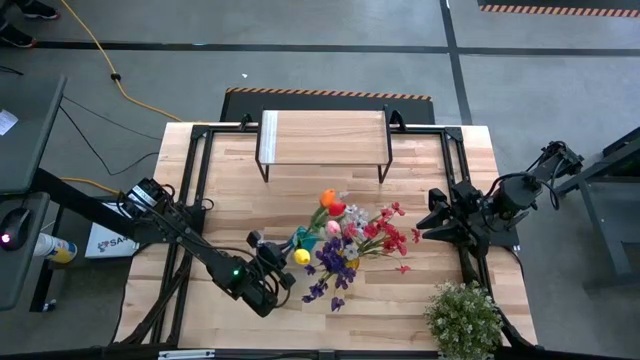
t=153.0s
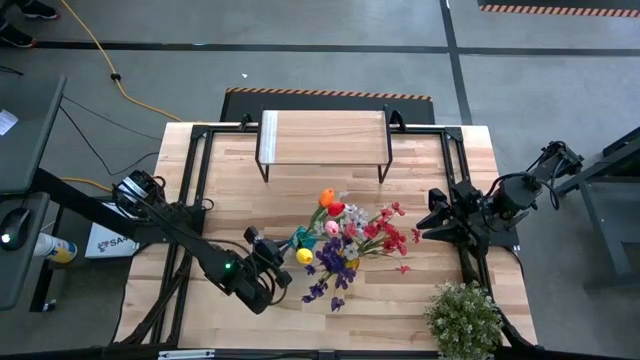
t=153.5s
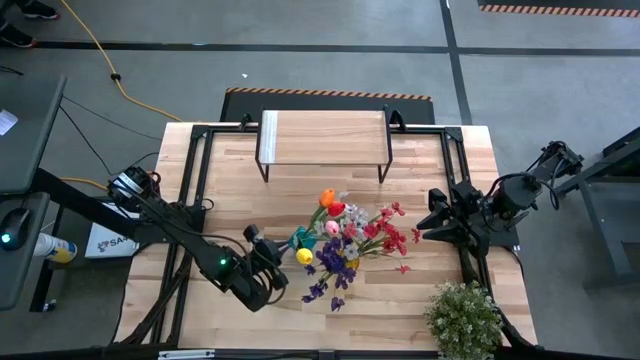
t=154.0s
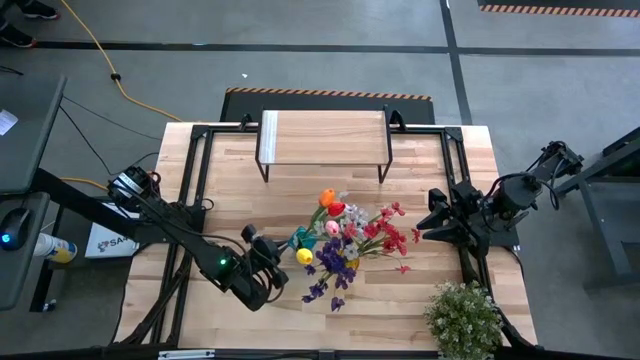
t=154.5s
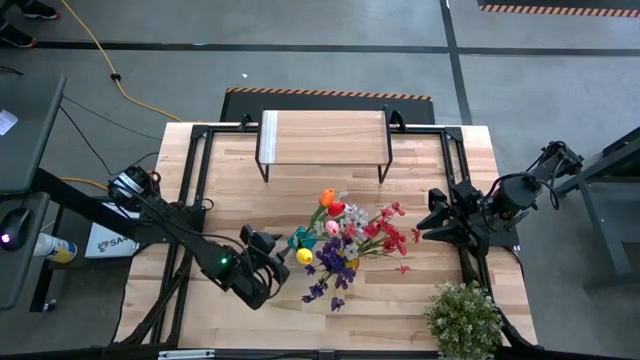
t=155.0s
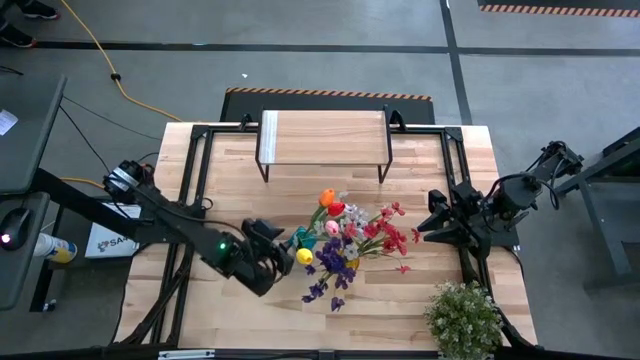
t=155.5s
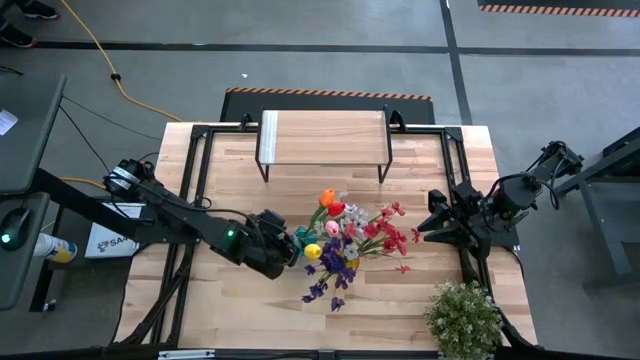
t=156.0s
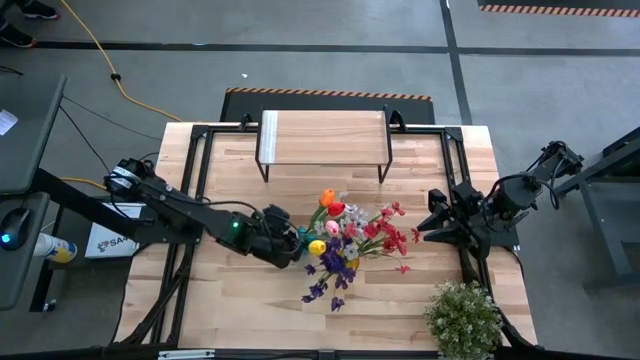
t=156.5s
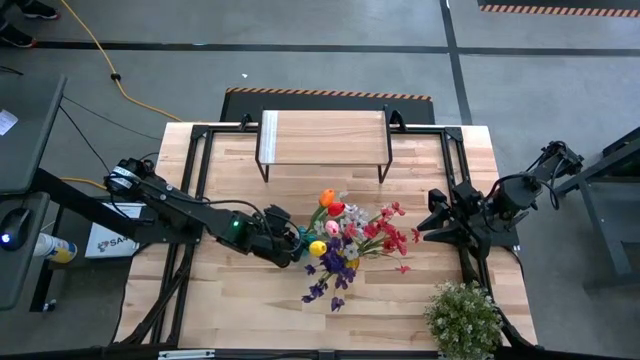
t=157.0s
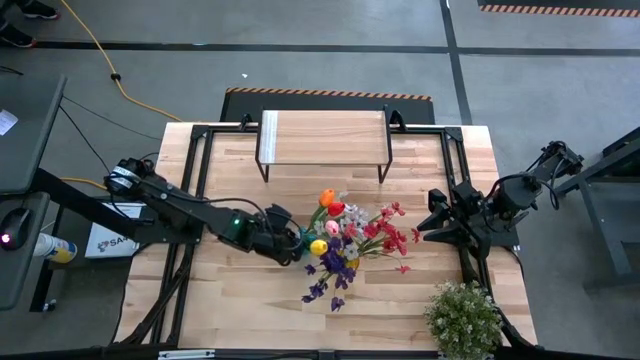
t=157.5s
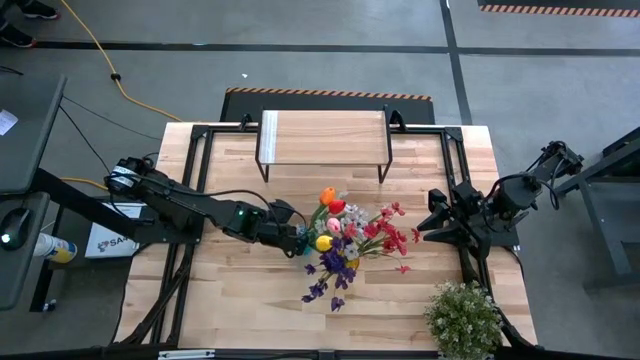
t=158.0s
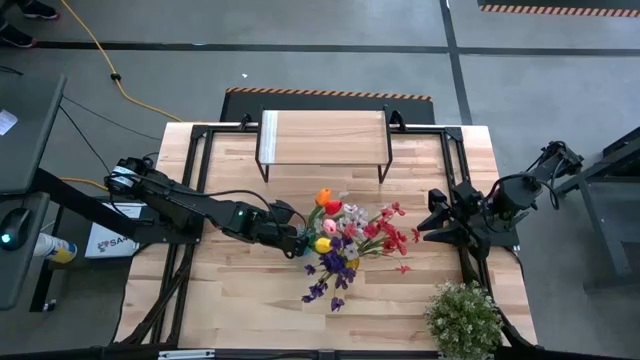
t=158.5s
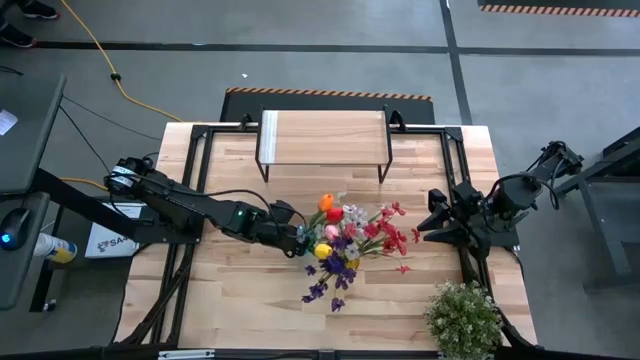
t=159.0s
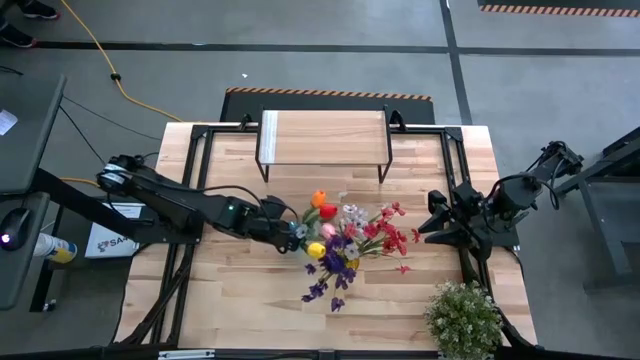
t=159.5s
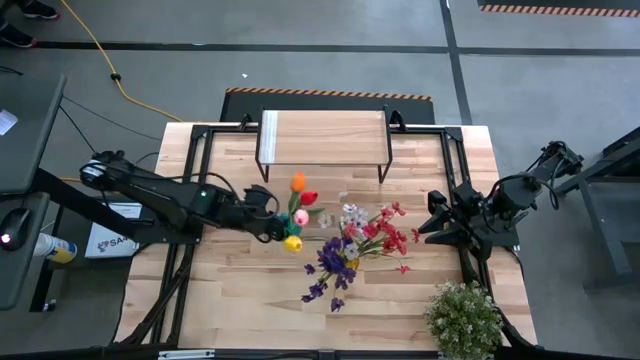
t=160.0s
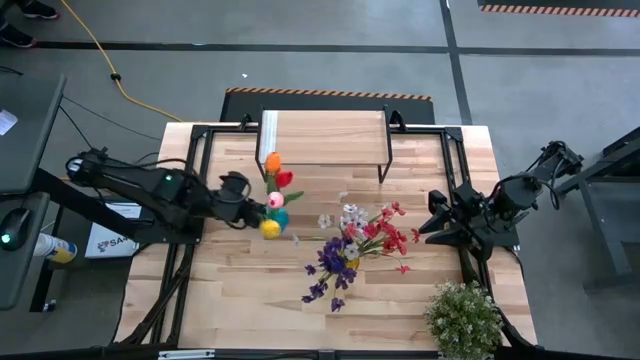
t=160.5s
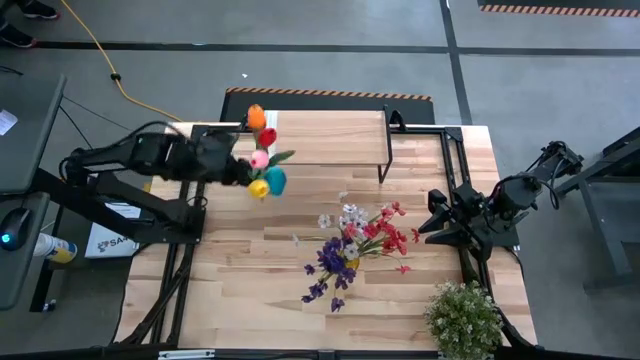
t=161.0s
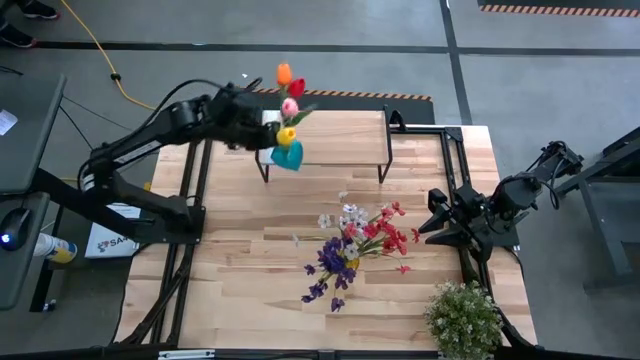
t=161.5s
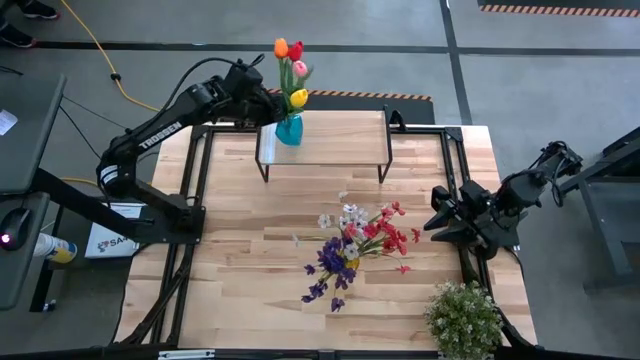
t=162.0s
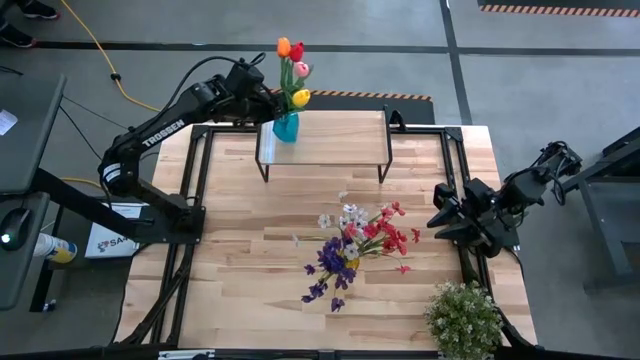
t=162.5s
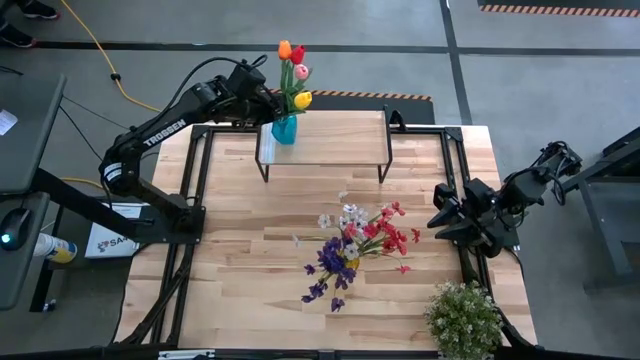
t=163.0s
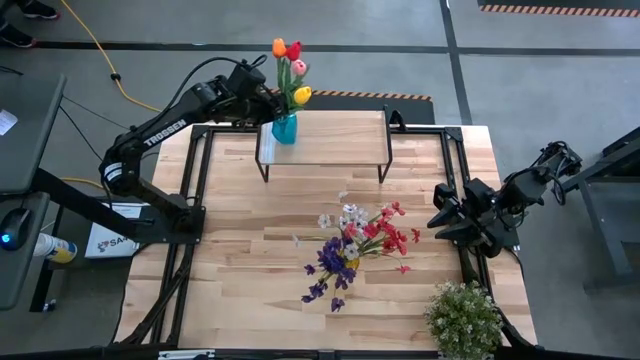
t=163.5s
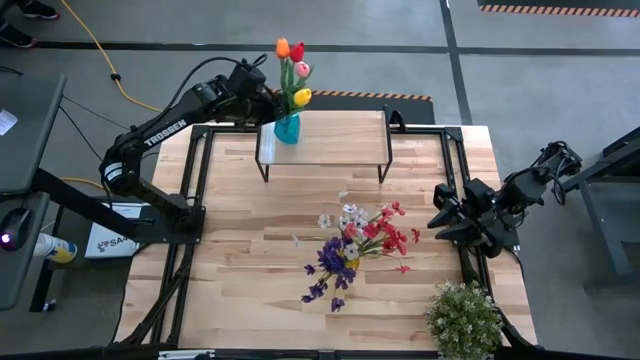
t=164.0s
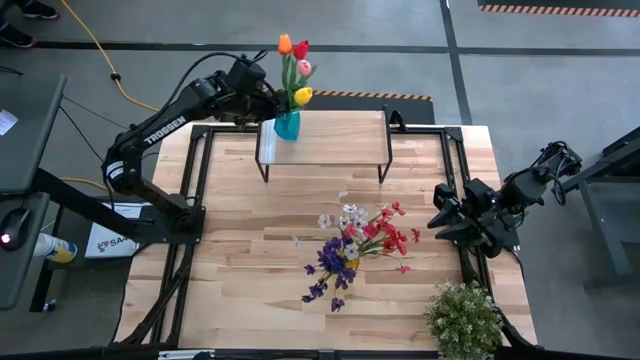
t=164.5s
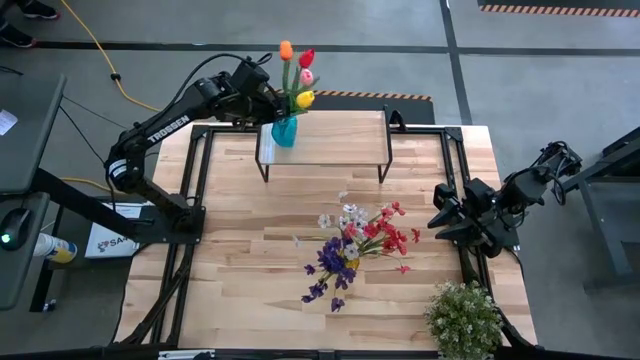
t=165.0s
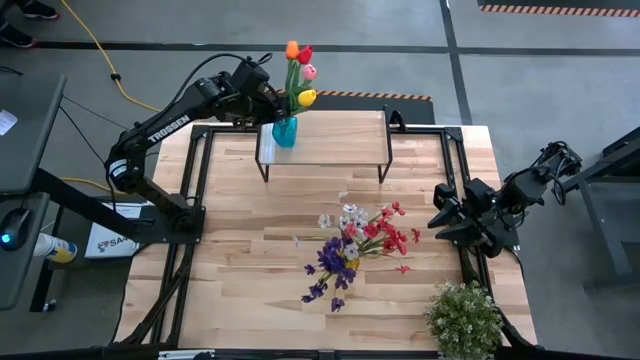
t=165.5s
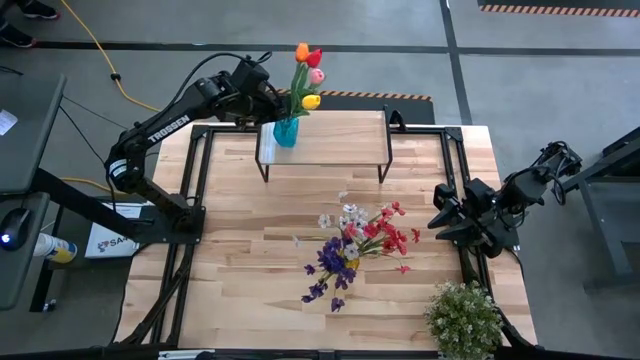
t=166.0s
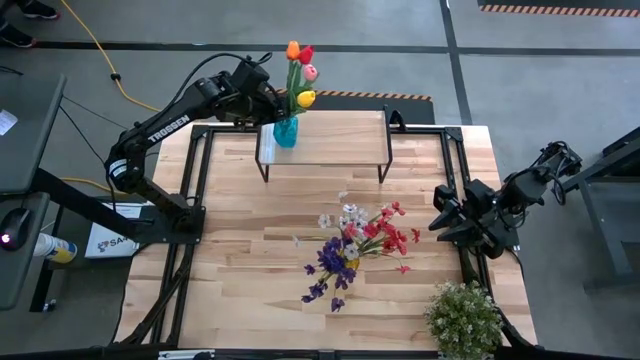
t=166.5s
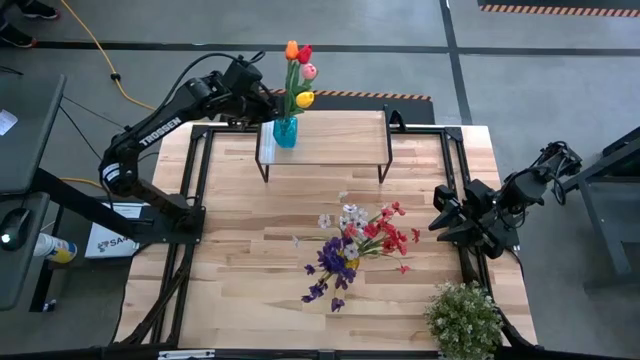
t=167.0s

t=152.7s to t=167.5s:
Task: Pick and place flowers into a vace then onto a shelf
Put the blue flower vase on the shelf

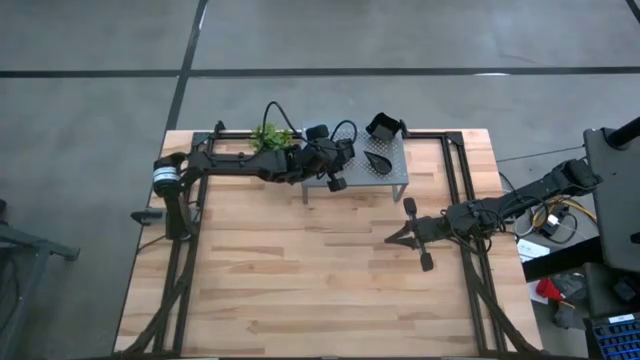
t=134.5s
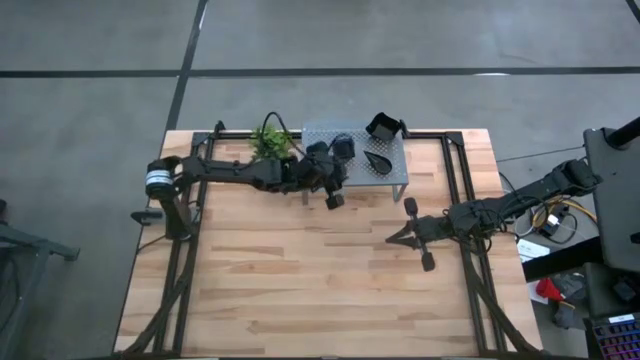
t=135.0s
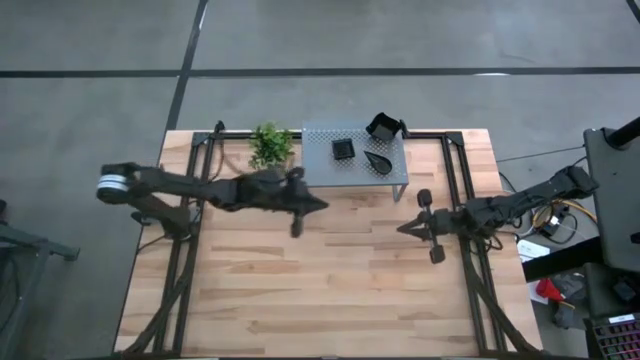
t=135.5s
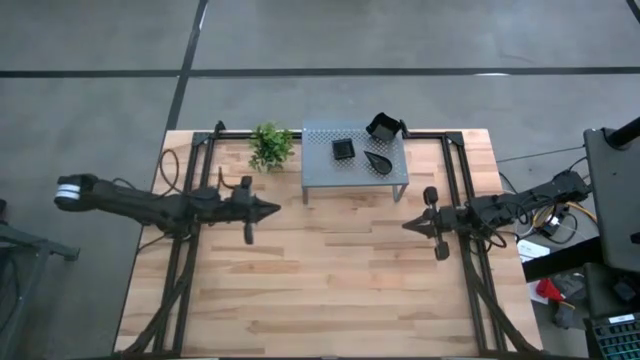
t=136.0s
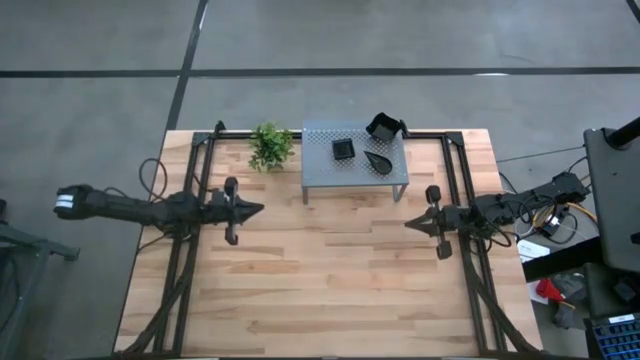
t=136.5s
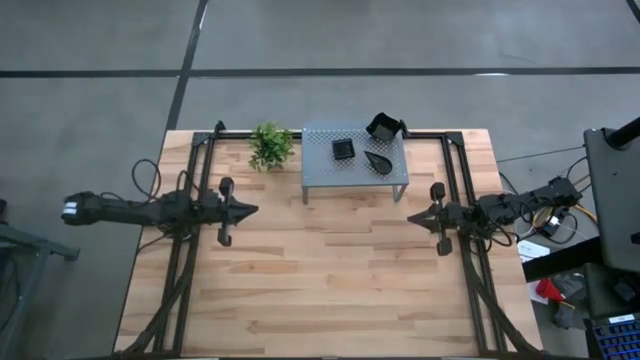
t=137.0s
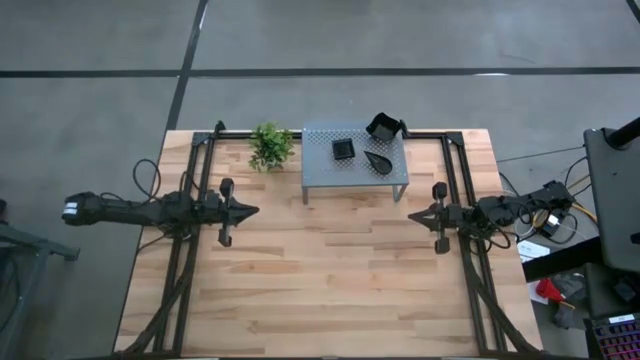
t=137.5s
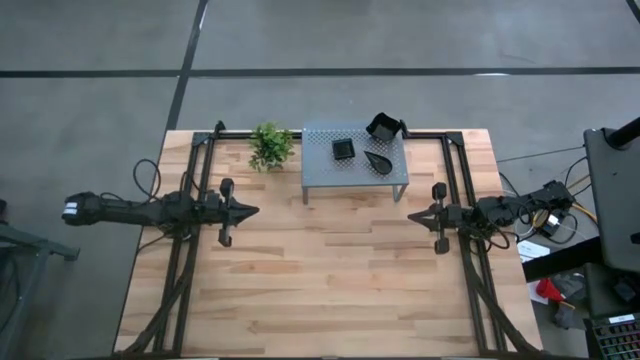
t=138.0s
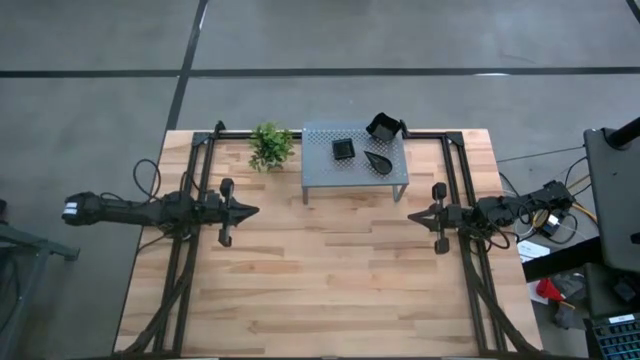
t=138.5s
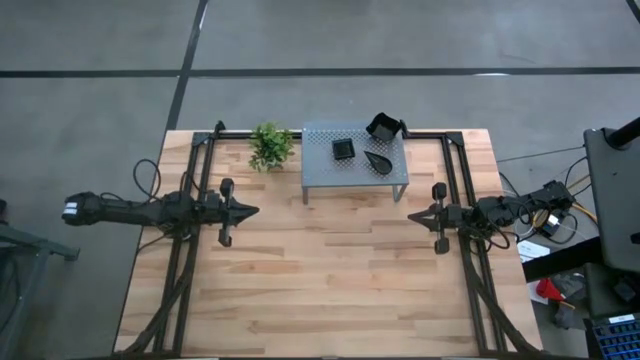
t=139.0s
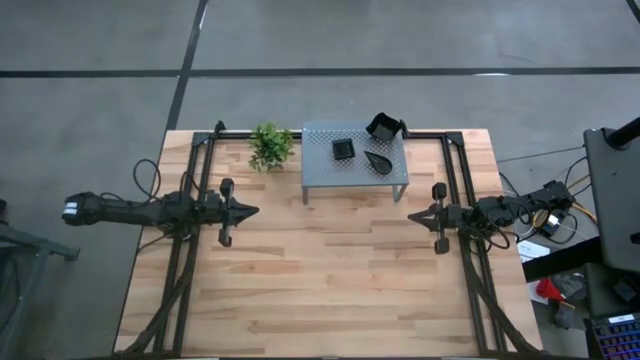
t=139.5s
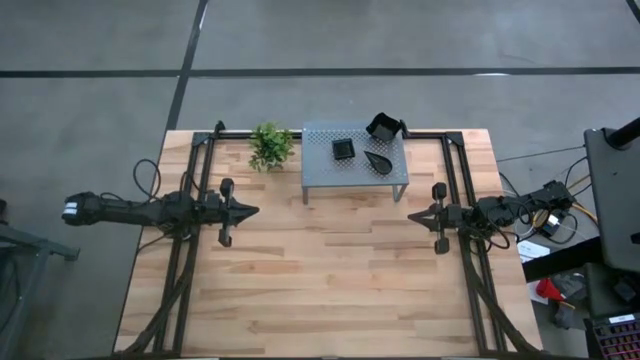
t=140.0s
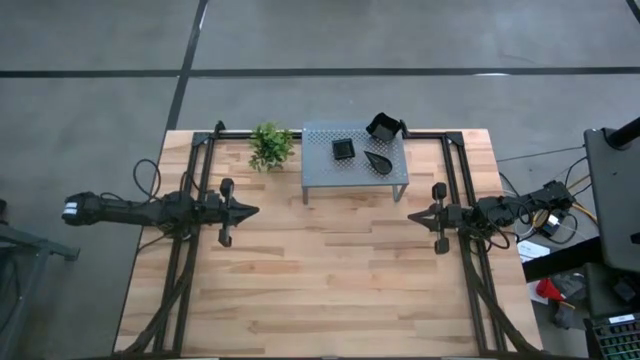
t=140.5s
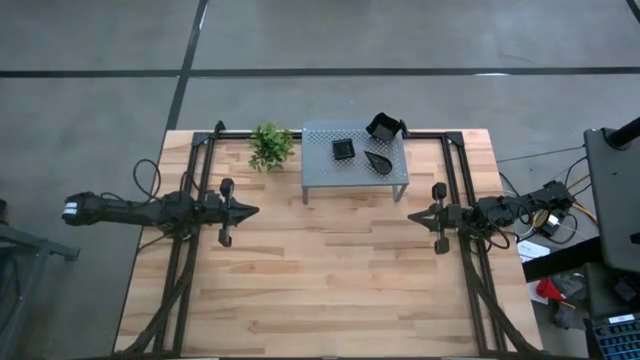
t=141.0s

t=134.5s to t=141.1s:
Task: Pick & Place Mini shaped plates
Return to Home Position
